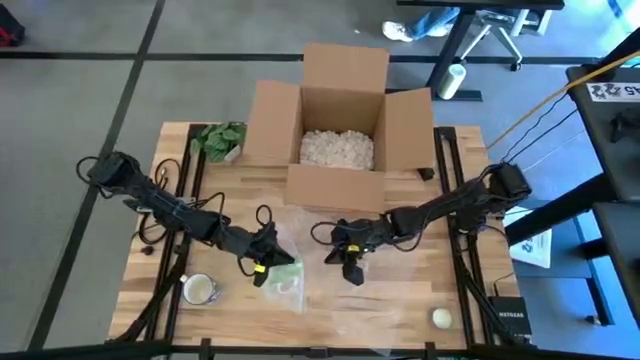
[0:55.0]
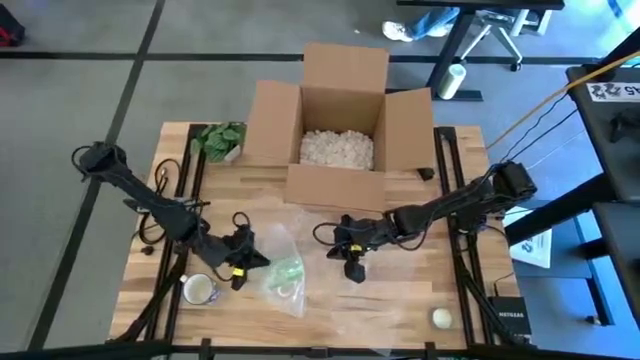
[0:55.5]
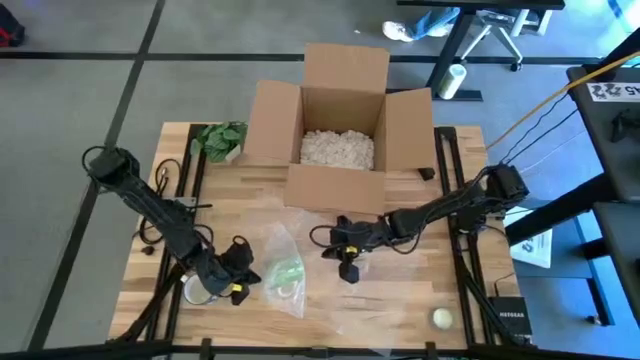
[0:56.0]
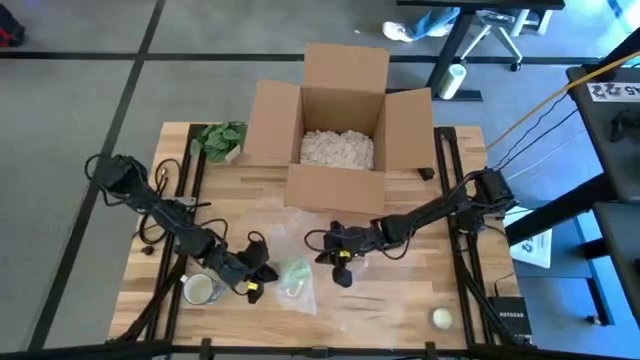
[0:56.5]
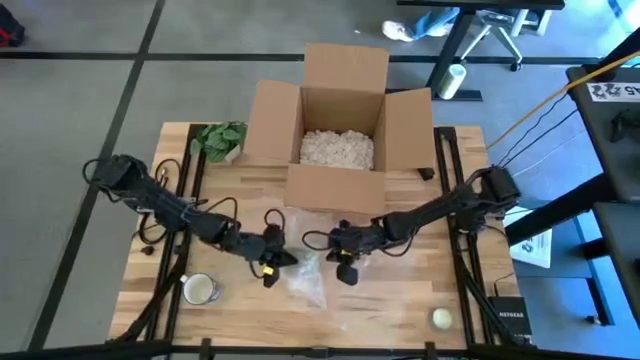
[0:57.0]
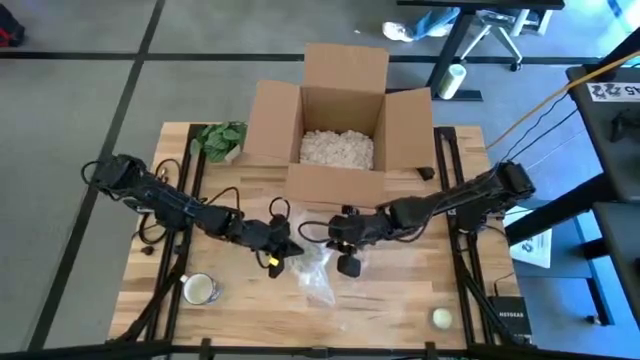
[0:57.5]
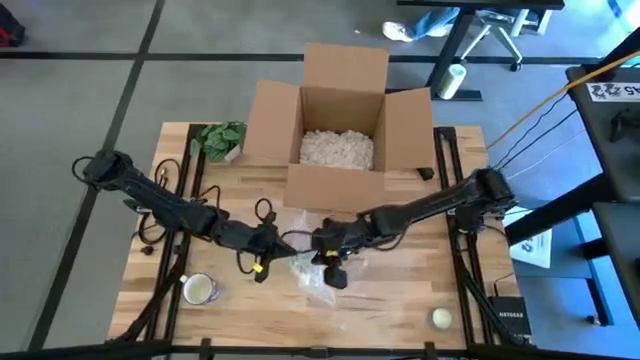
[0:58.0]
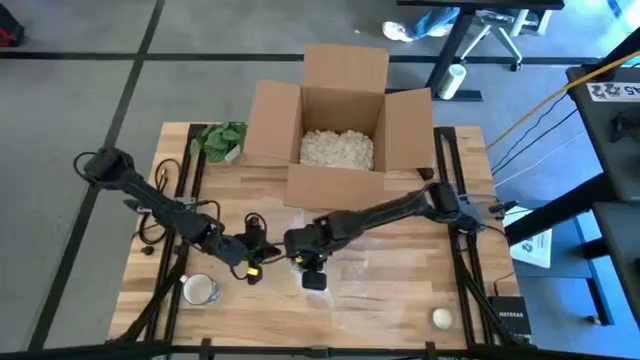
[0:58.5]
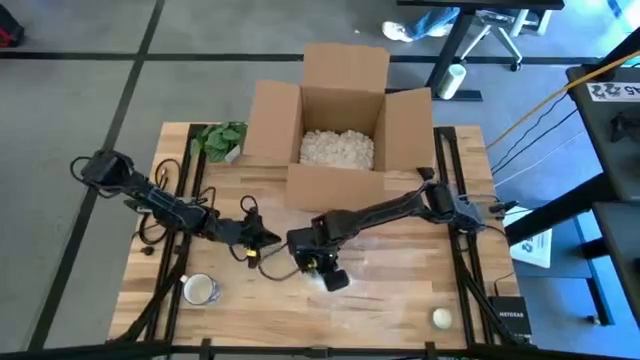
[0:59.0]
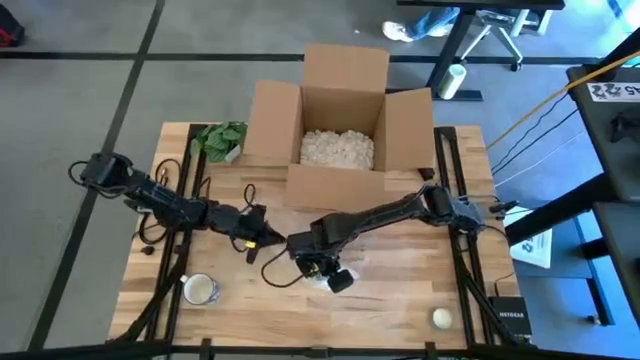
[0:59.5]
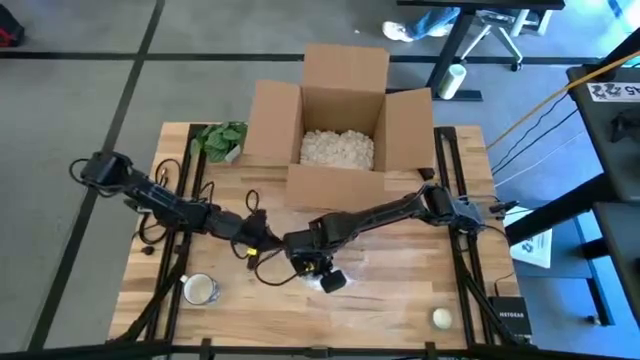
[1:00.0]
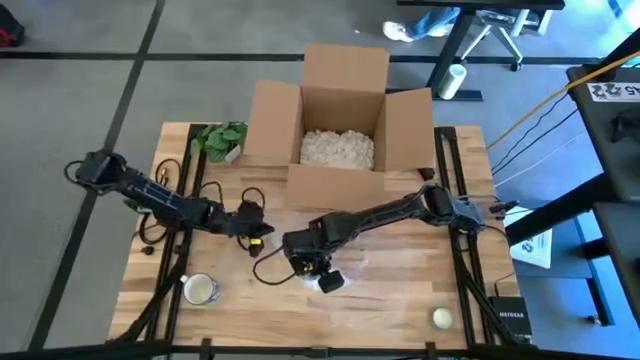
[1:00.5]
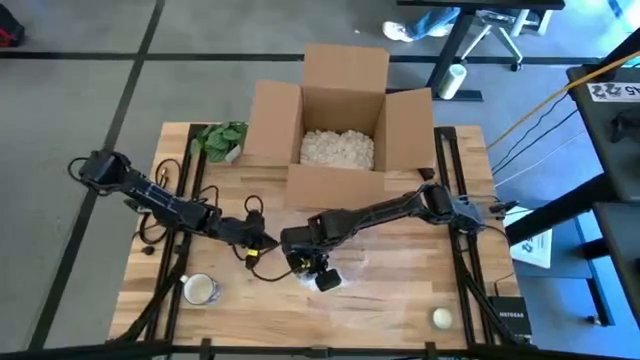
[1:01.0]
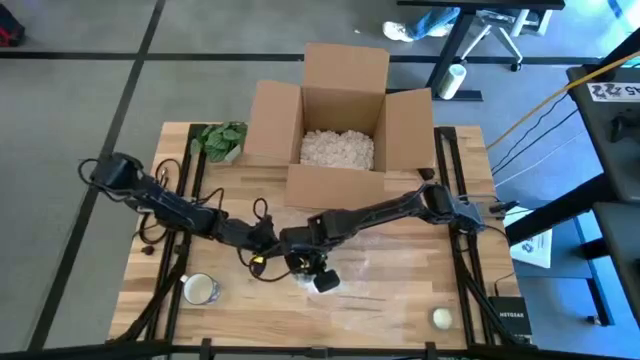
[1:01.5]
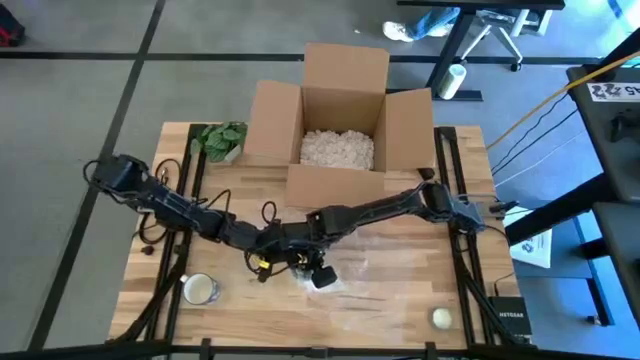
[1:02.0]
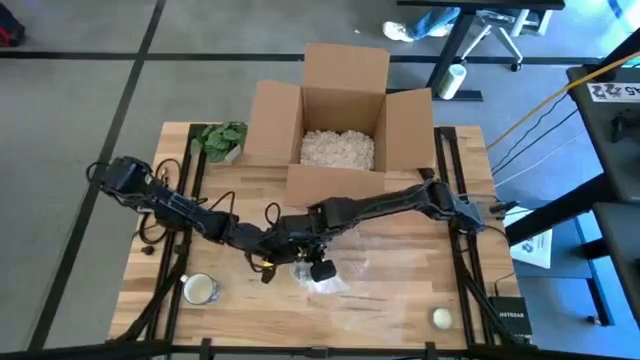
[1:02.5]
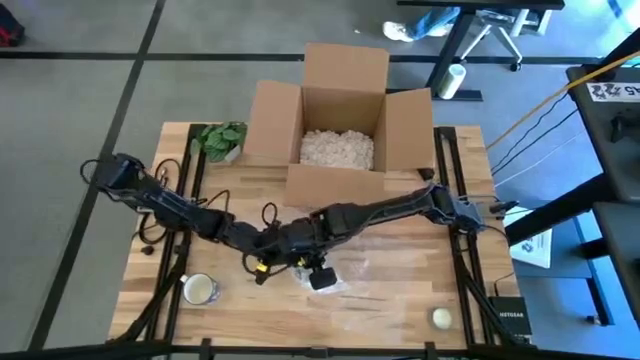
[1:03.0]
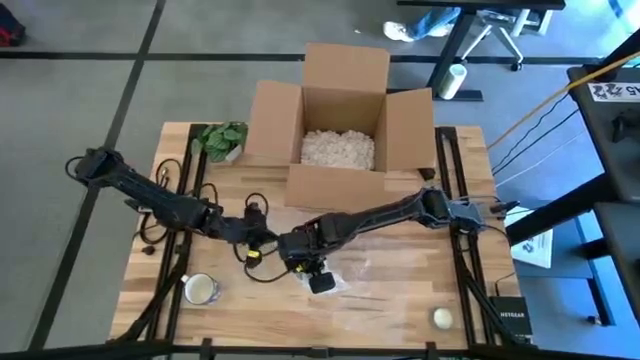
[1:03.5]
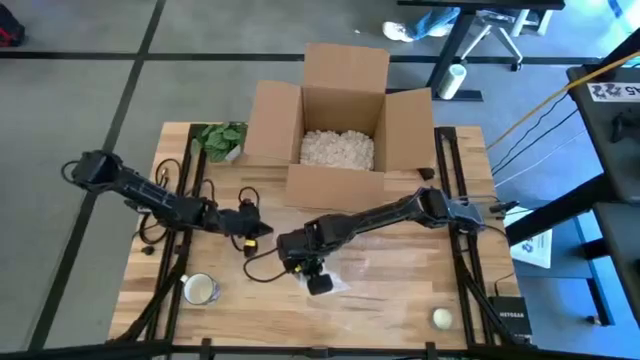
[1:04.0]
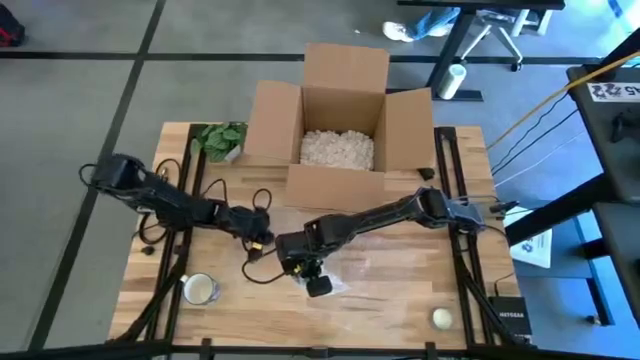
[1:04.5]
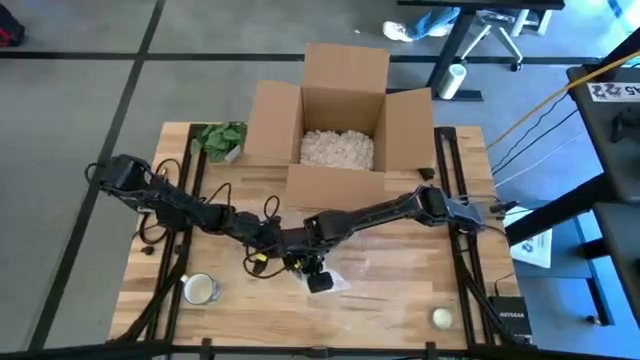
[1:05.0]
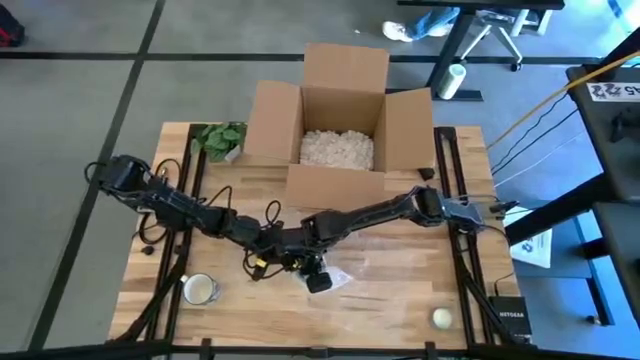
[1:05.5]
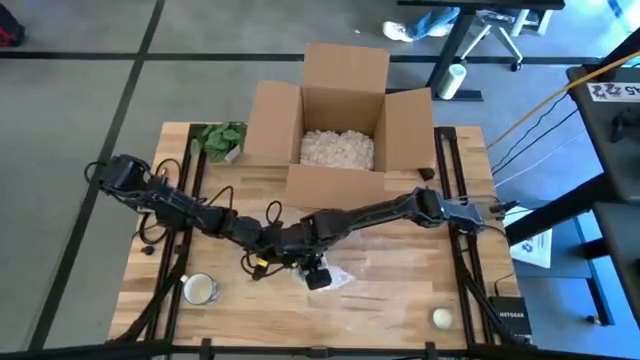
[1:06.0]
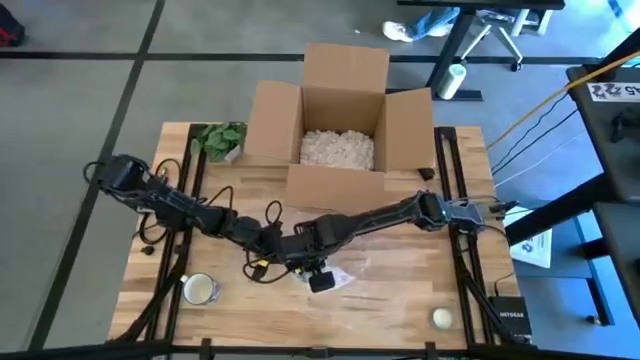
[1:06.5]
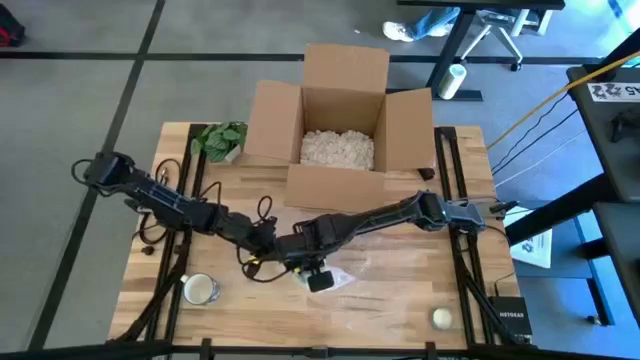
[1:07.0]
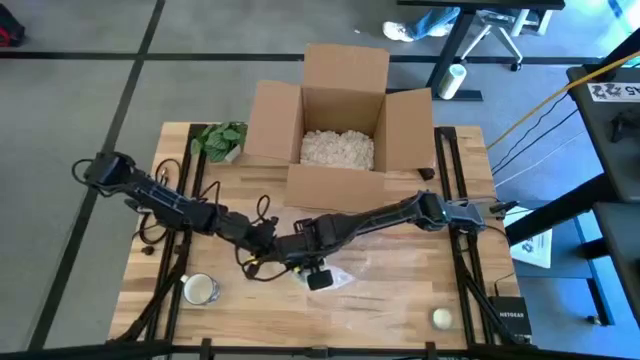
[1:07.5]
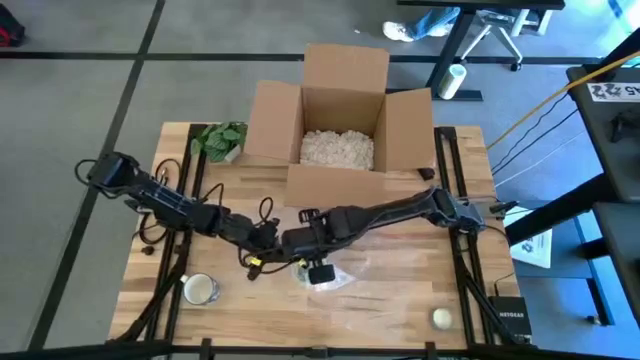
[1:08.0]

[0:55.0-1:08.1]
Task: wrap mug
Wrap the green mug with the bubble wrap

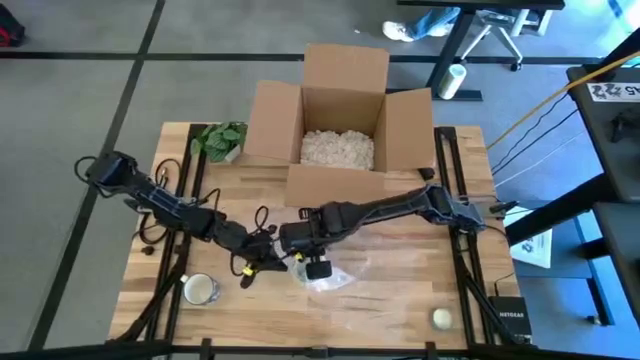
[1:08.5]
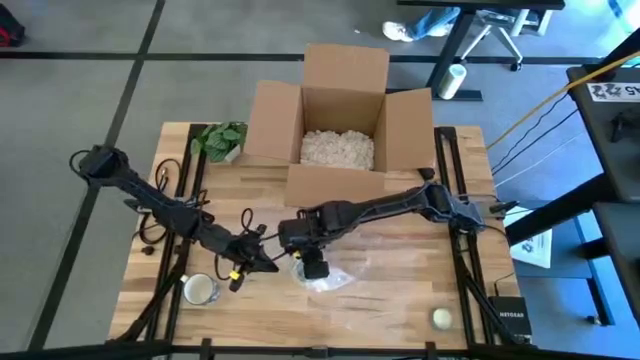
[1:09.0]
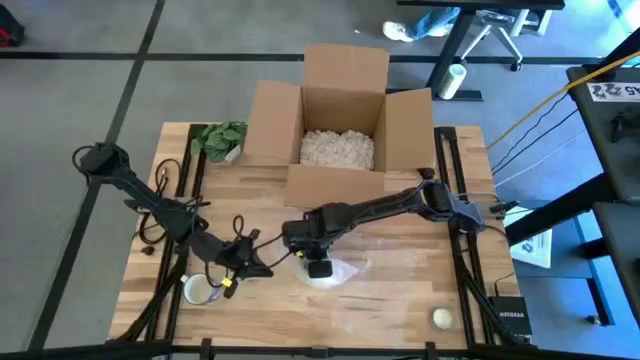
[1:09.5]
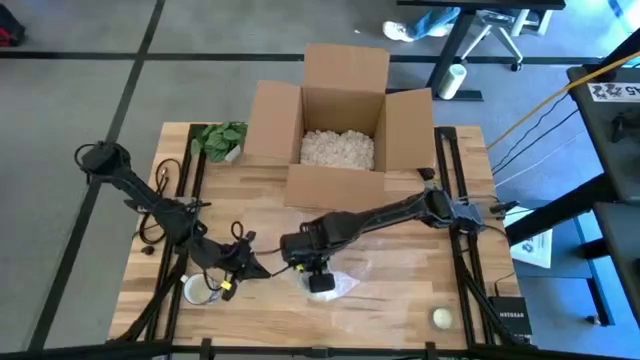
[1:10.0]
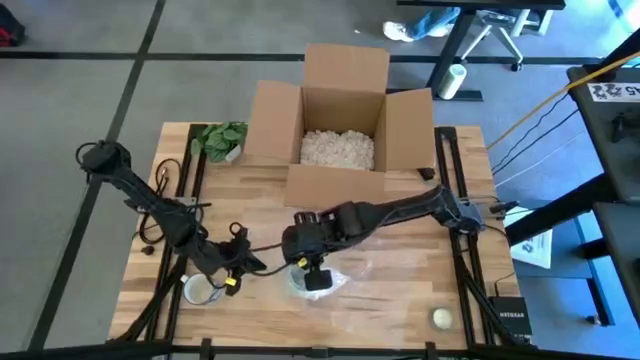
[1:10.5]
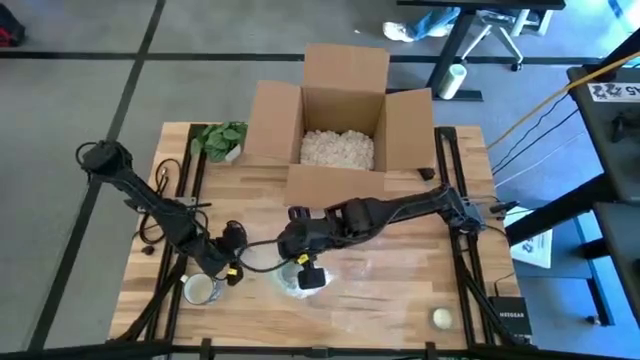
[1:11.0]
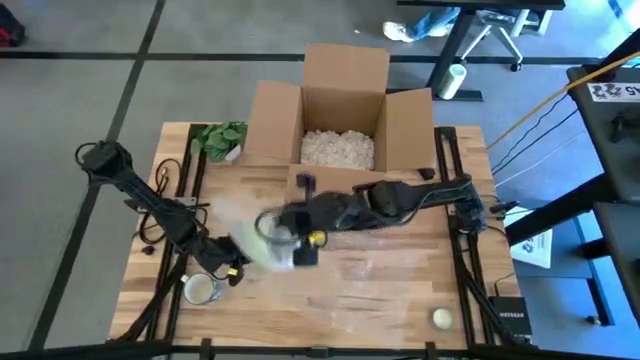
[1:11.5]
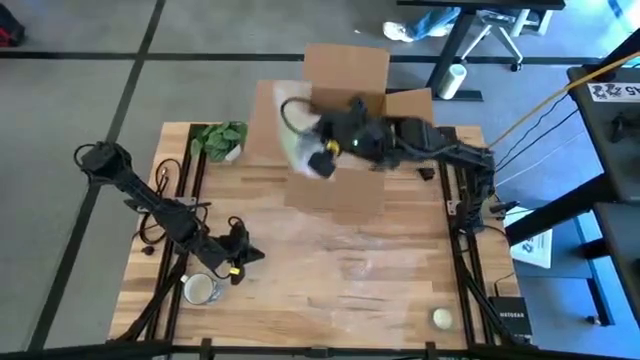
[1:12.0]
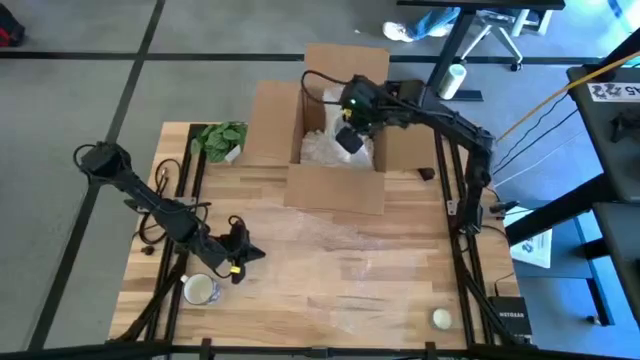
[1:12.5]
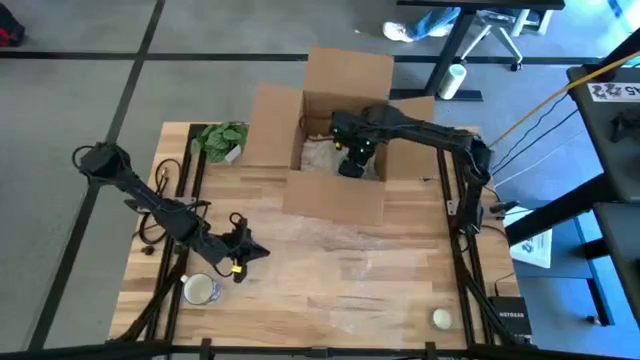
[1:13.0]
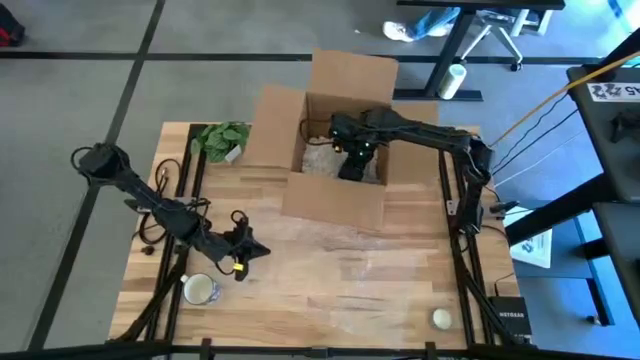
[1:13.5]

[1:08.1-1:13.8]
Put the wrapped green mug into the cardboard box
